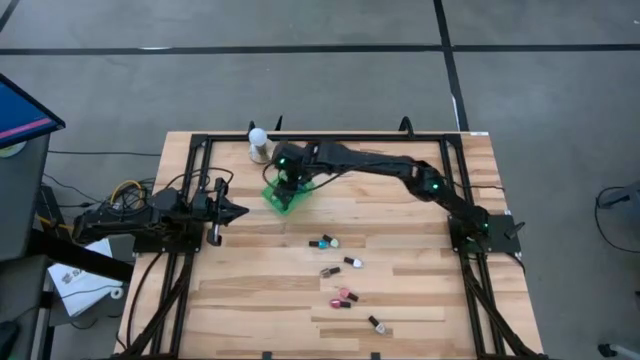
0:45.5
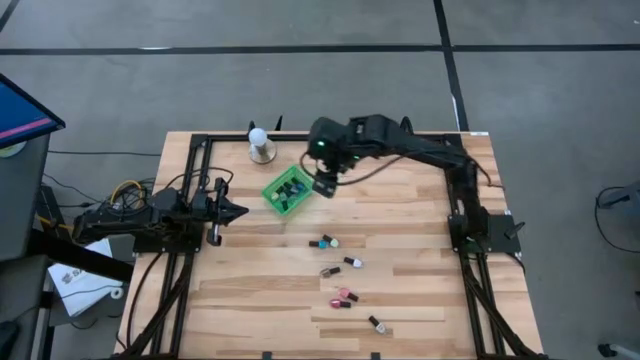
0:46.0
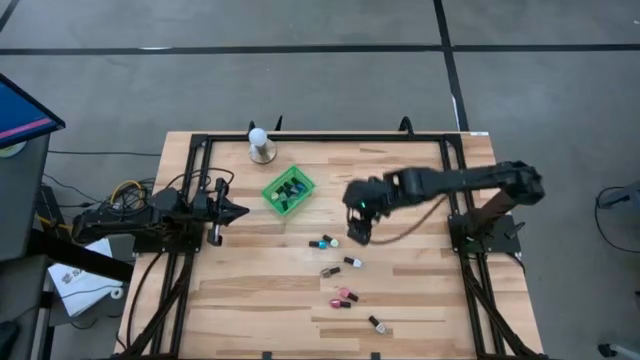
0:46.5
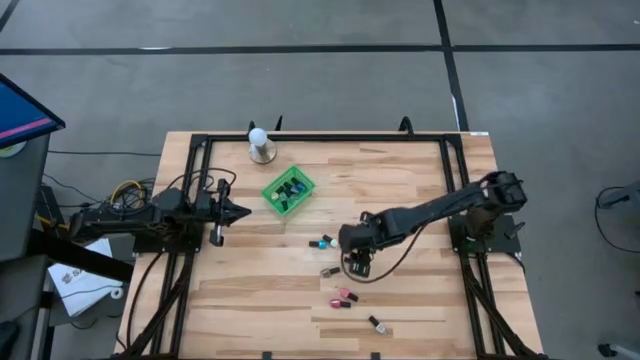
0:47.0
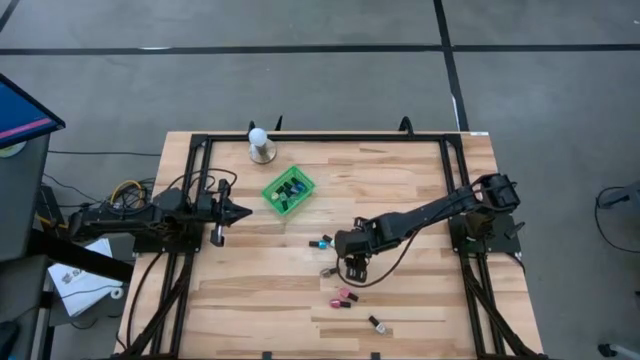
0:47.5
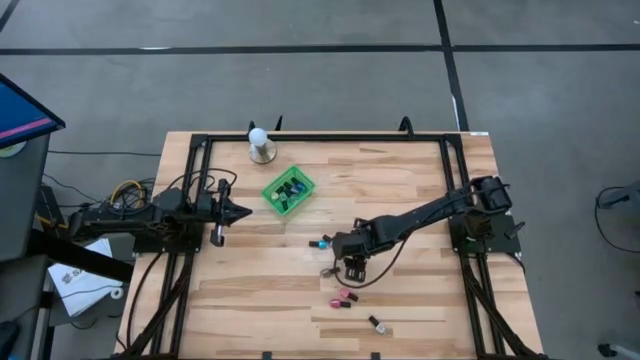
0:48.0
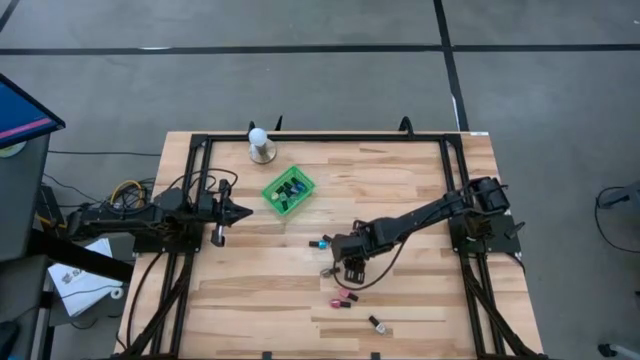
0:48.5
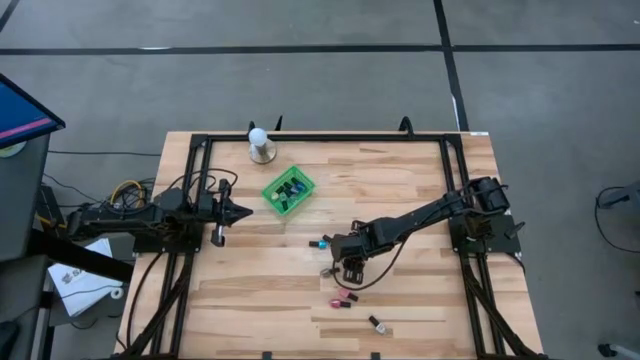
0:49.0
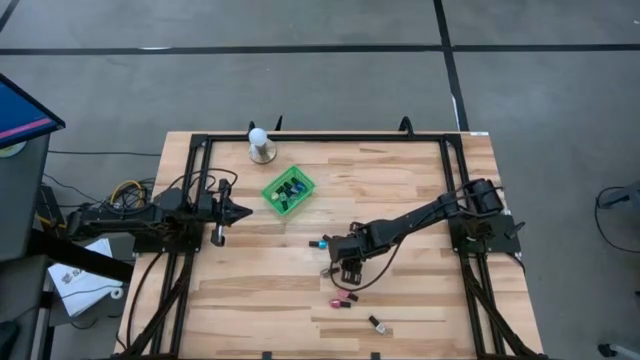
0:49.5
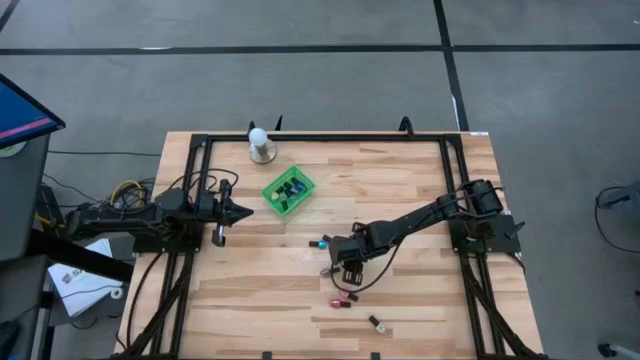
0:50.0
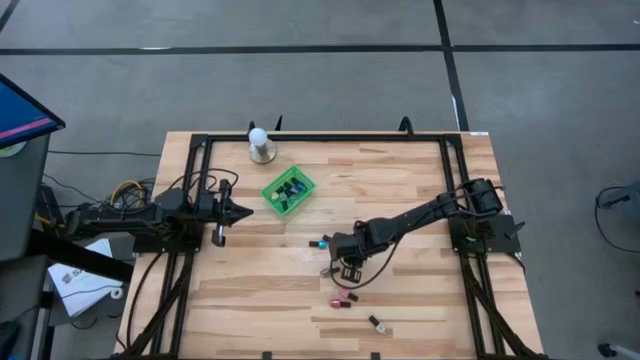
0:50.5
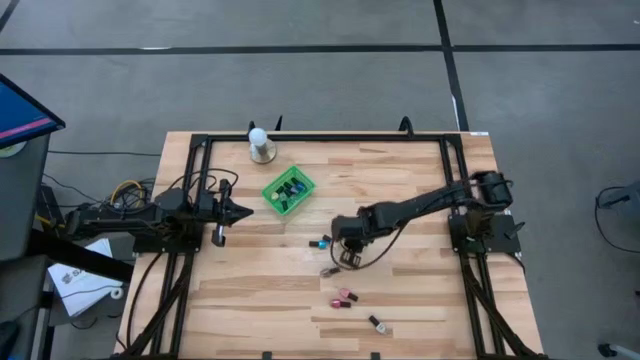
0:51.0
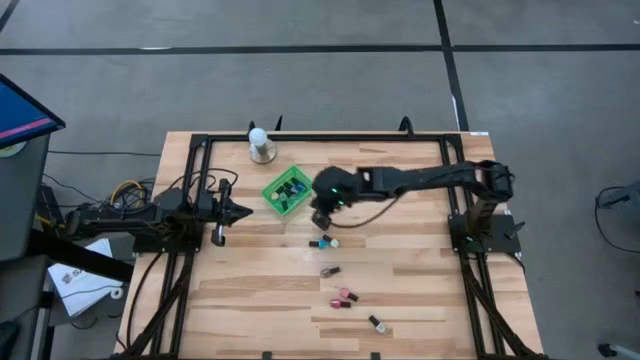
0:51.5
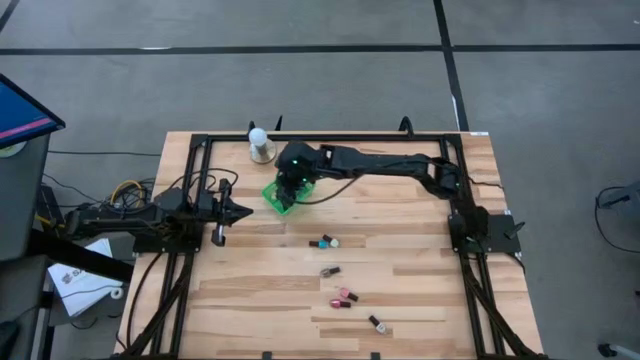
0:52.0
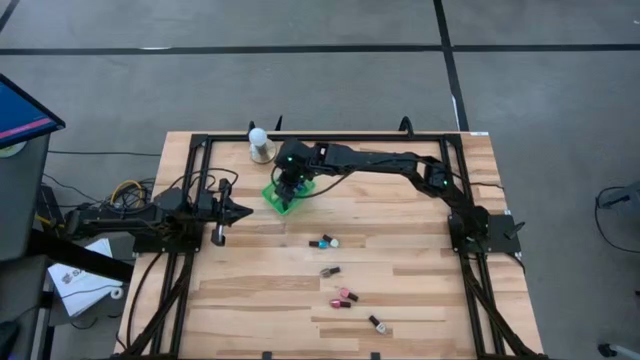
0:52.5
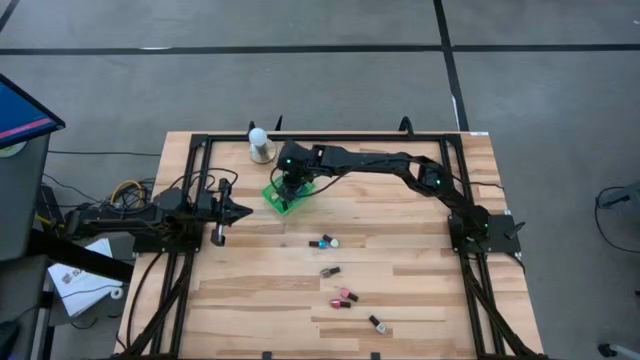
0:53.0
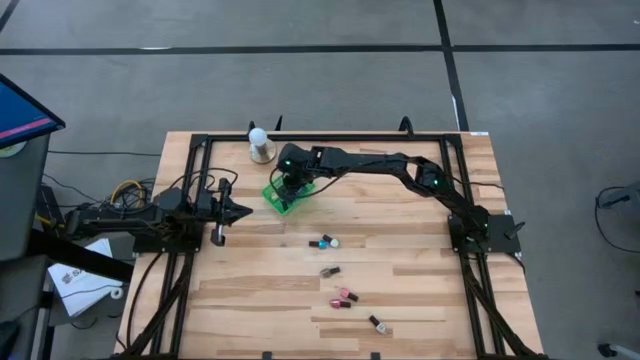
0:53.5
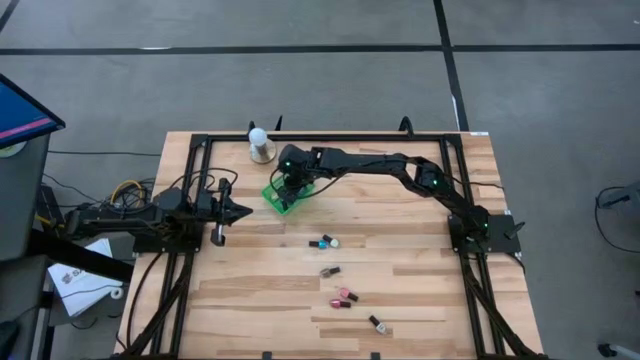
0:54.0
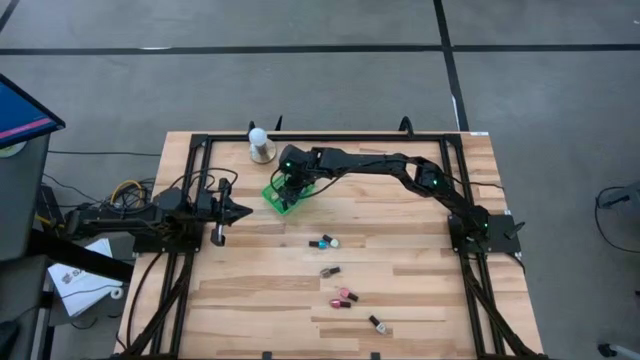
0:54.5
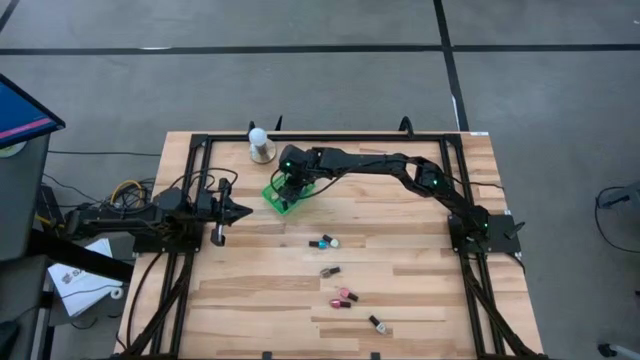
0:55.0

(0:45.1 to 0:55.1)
Task: Pick & Place Nail Polish
Put the top white nail polish bottle into the green bin

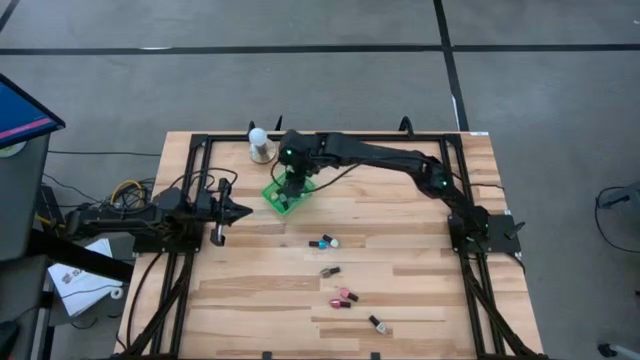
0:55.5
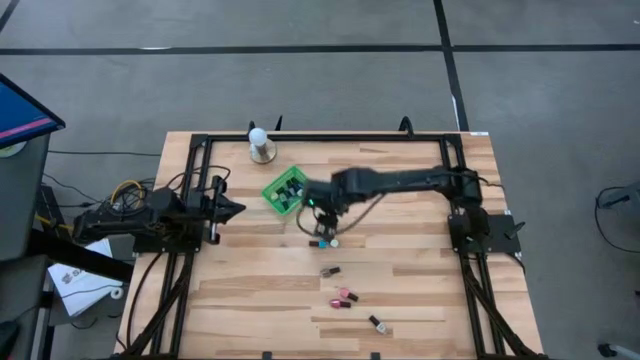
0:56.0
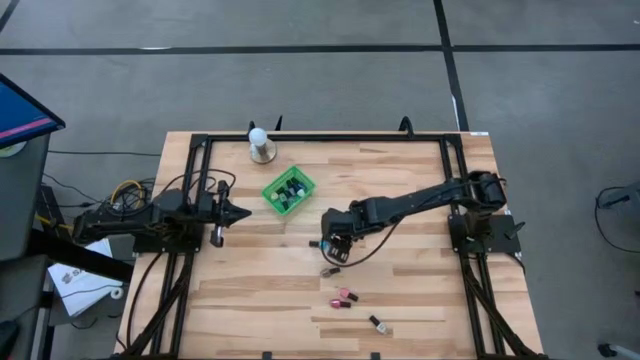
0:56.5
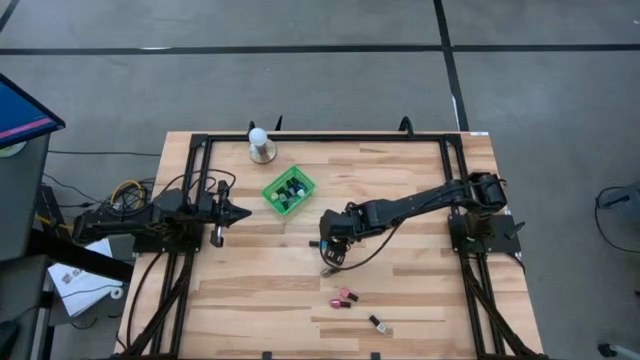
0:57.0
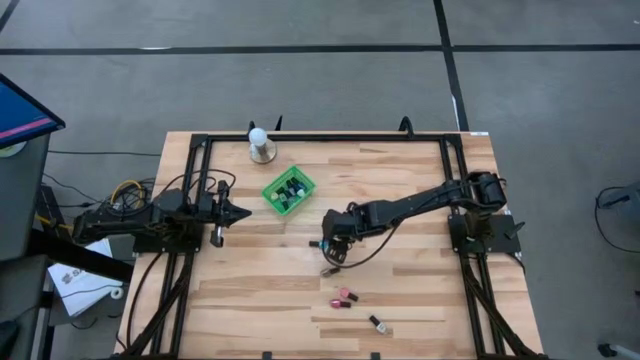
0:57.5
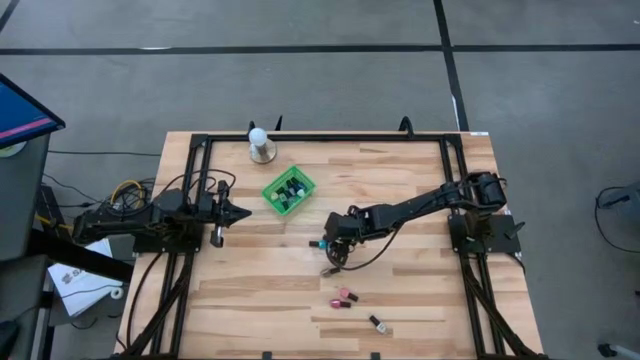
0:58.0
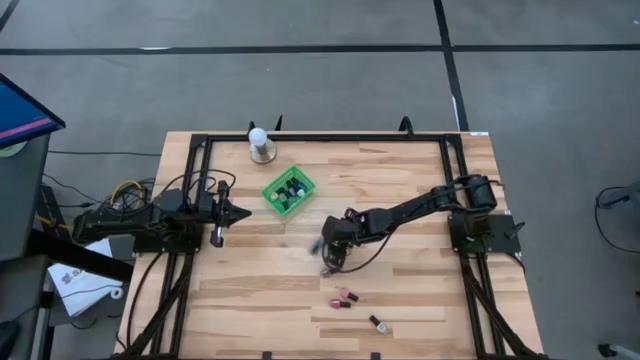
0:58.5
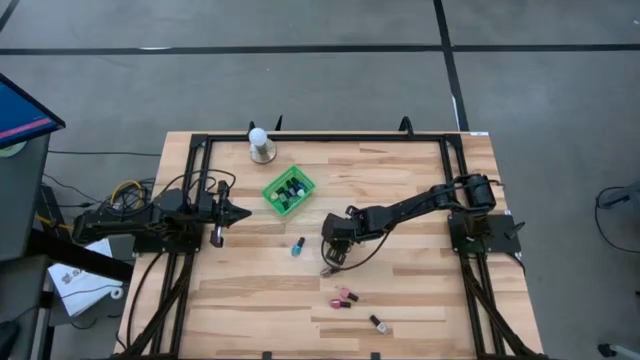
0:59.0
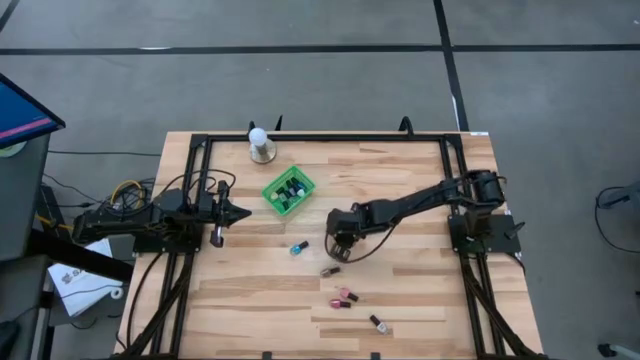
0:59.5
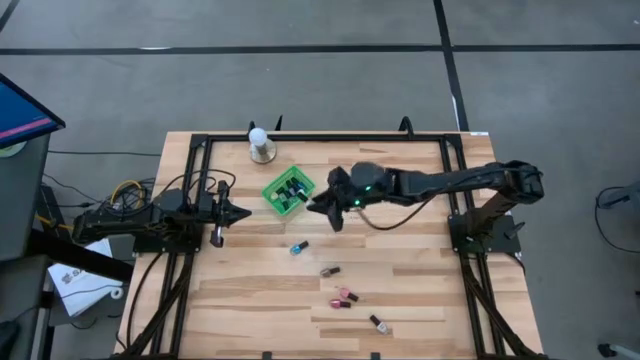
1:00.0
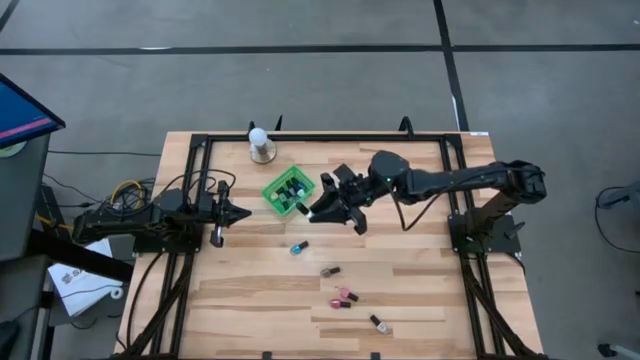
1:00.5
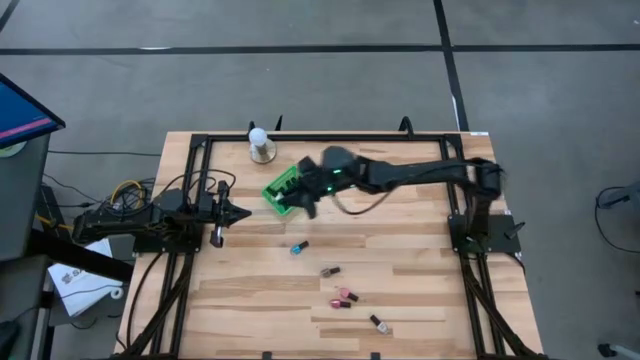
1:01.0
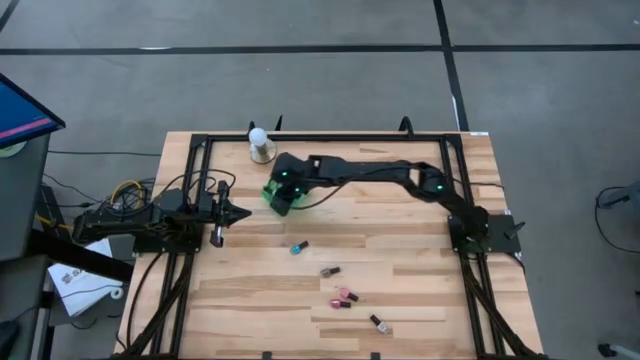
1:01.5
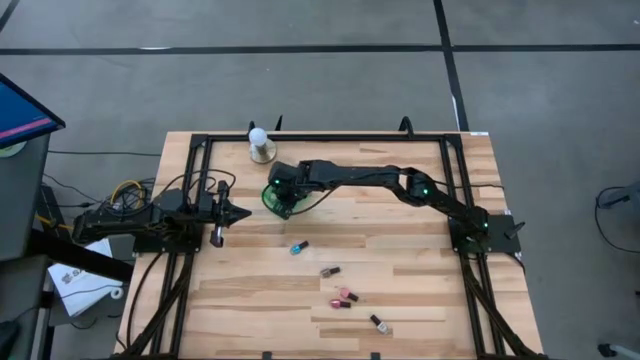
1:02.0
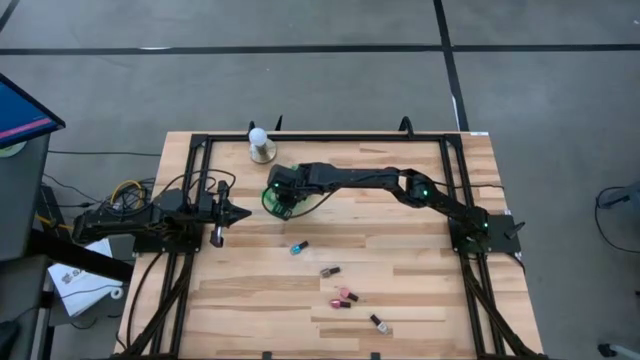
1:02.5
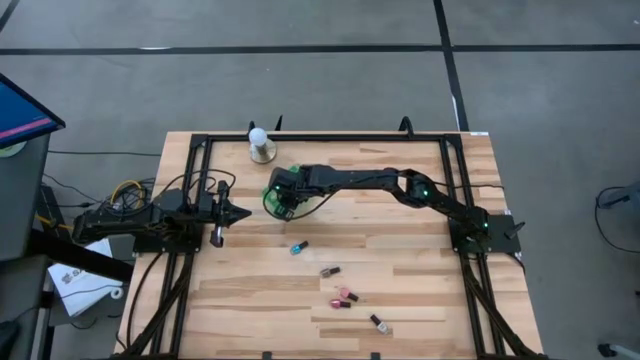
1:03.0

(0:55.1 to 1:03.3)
Put the light green nail polish bottle into the green bin

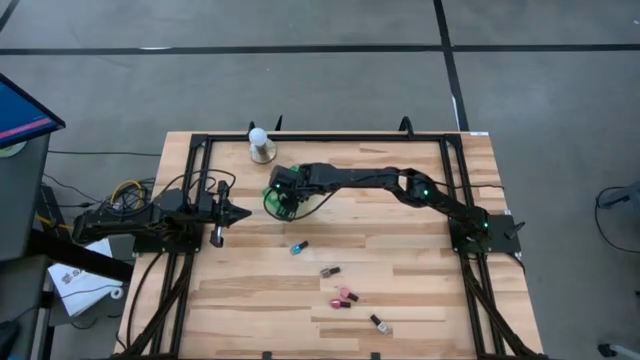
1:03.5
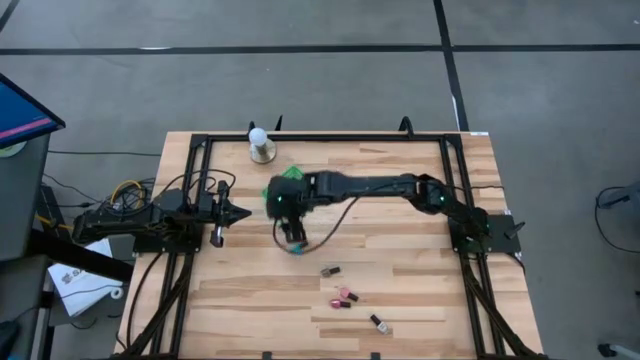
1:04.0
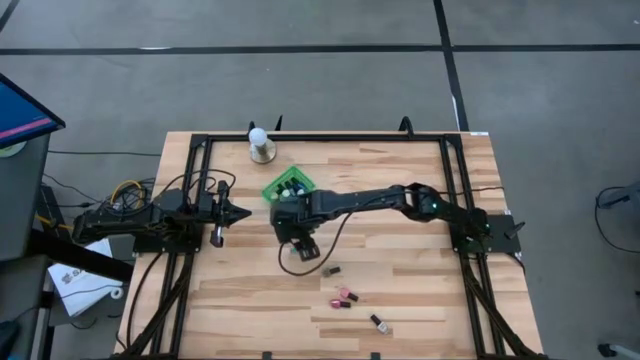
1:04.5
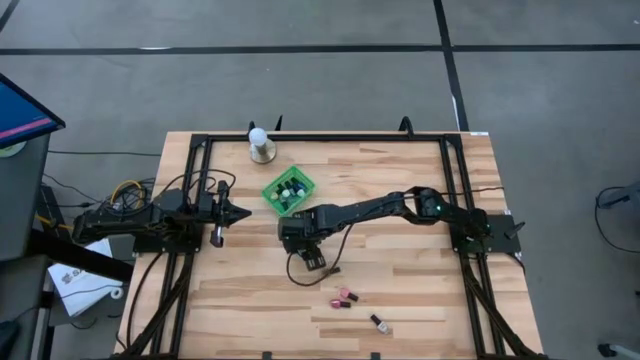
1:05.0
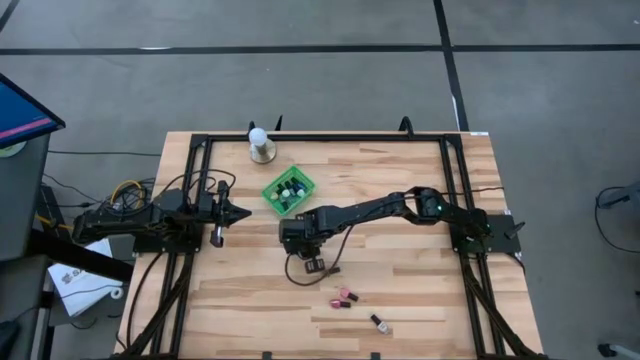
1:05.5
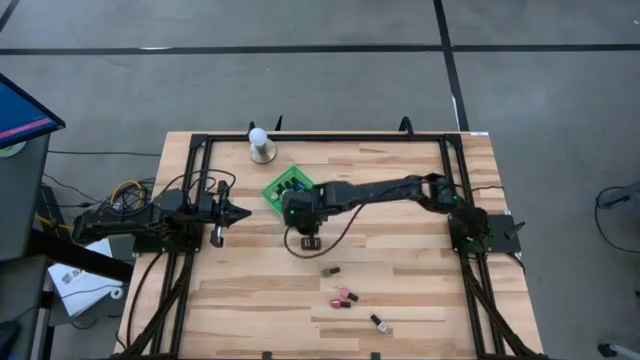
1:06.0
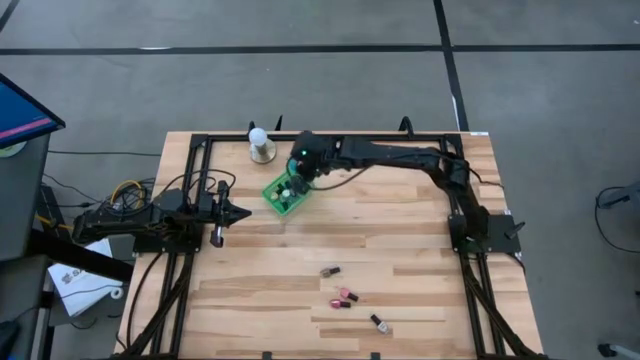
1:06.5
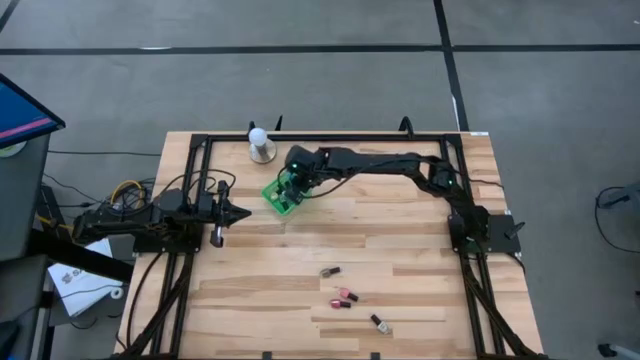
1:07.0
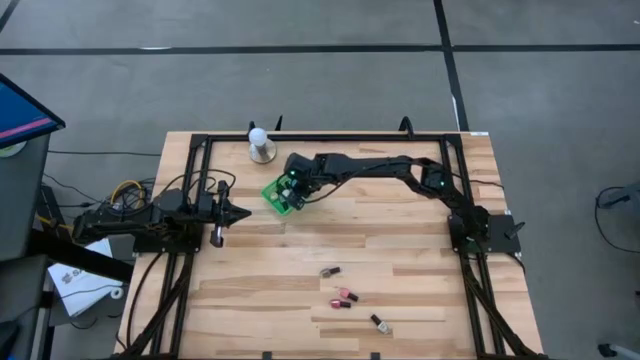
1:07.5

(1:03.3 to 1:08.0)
Put the light blue nail polish bottle into the green bin
